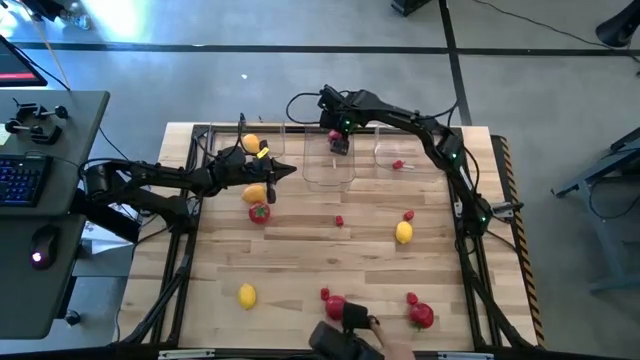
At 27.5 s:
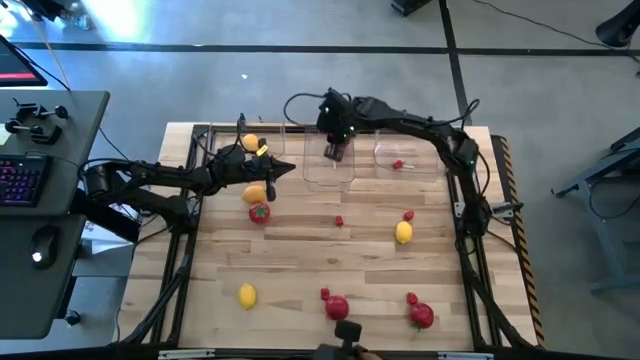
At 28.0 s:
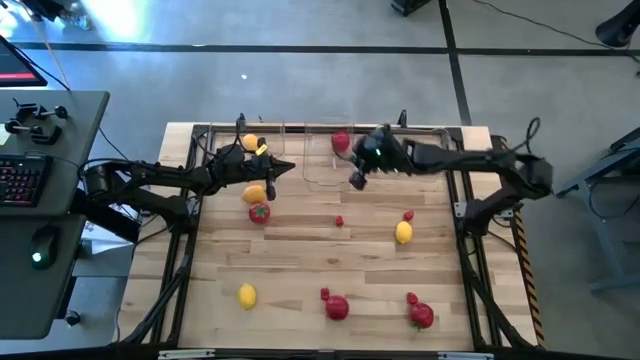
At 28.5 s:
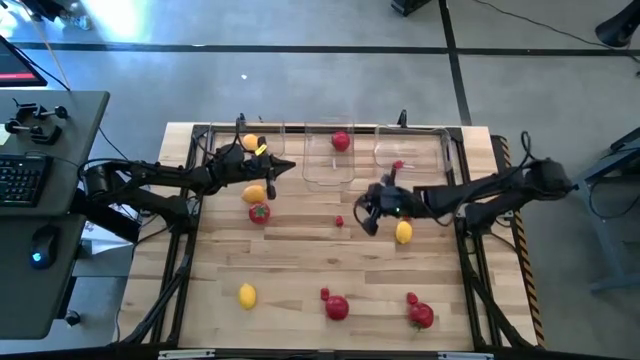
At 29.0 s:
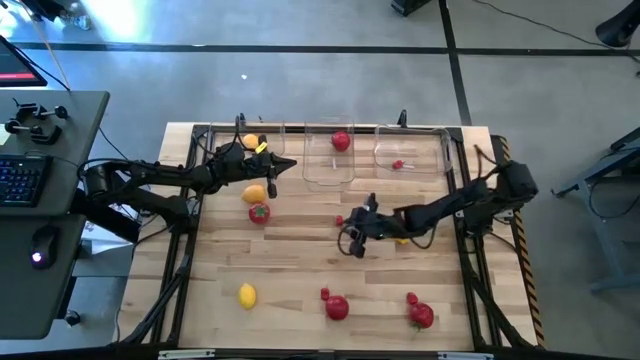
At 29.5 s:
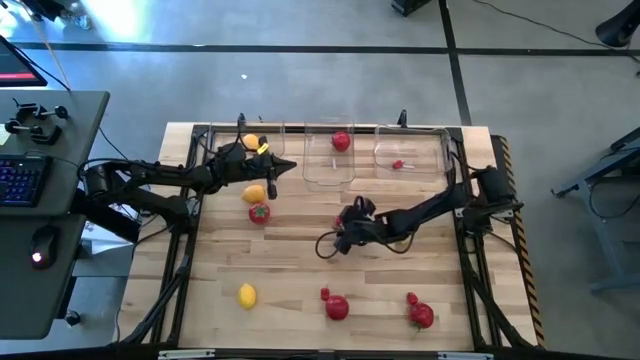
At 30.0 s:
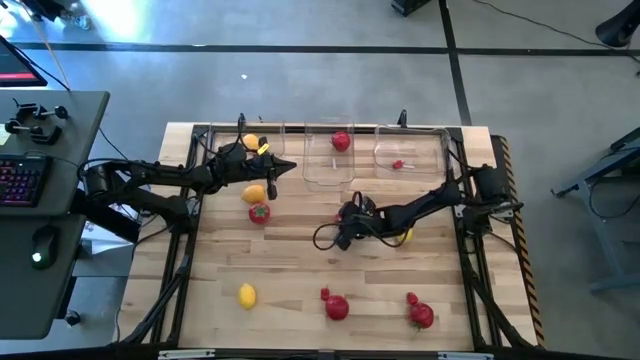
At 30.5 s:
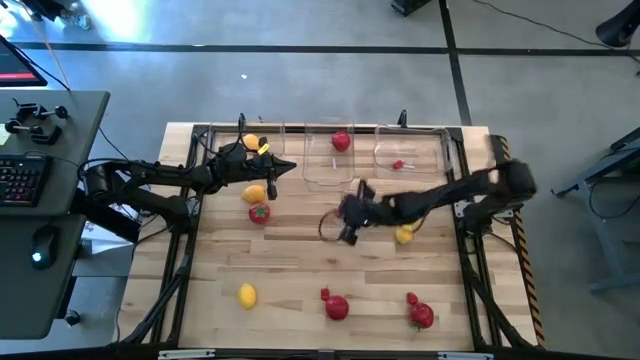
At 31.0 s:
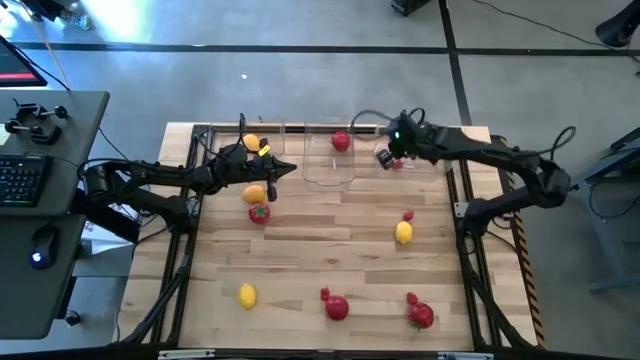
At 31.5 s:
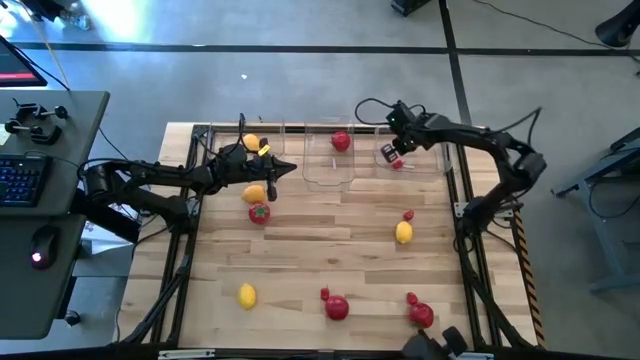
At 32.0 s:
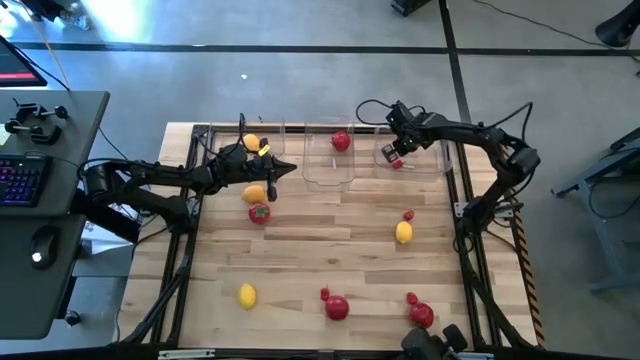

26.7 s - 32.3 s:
Task: Sort produce into baskets
Put the chili pepper into the right transparent bin

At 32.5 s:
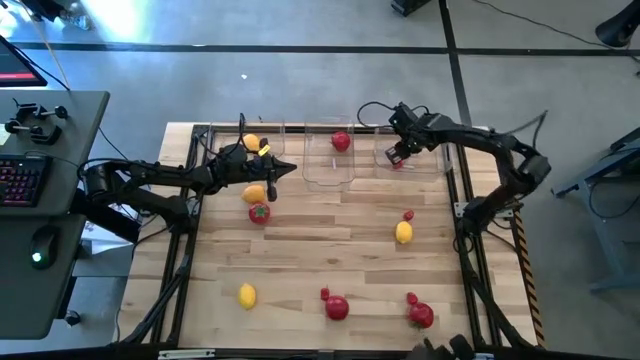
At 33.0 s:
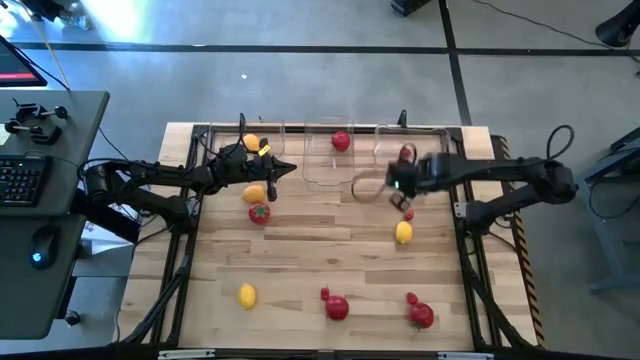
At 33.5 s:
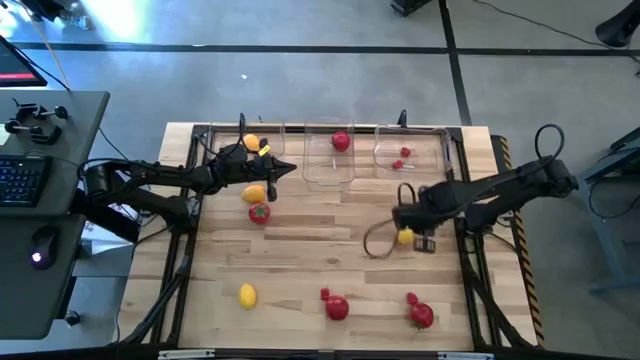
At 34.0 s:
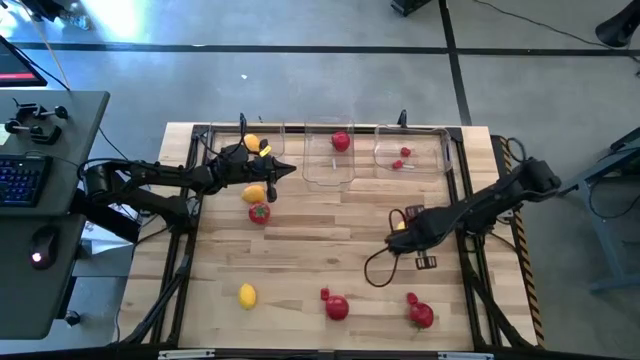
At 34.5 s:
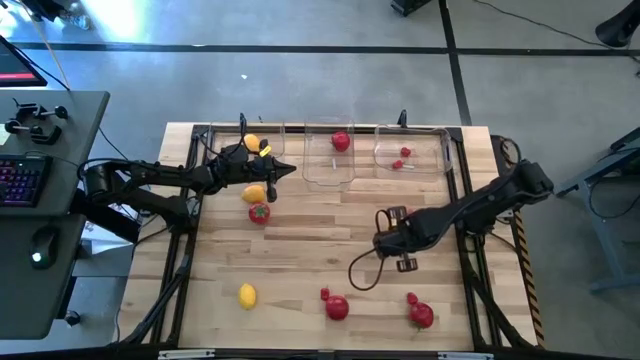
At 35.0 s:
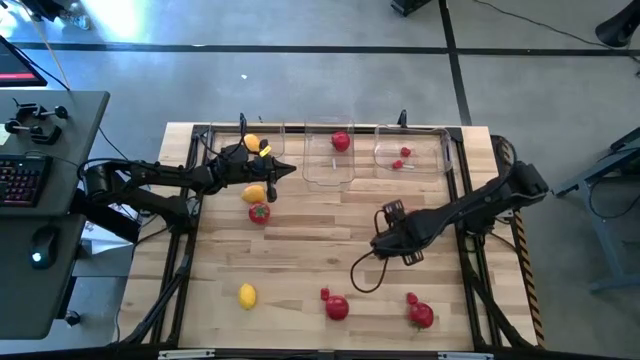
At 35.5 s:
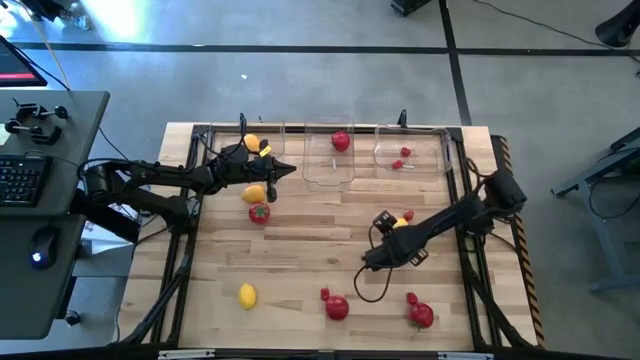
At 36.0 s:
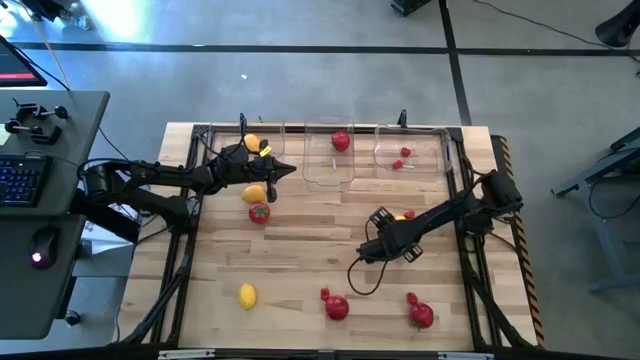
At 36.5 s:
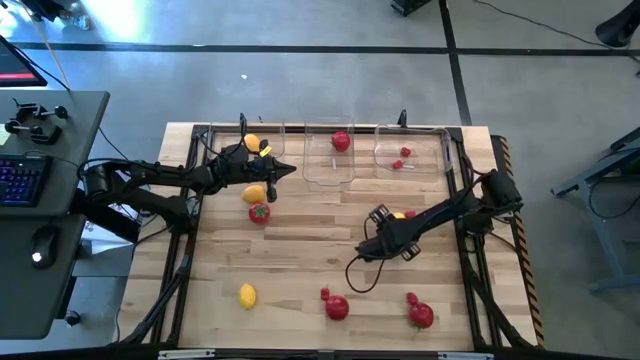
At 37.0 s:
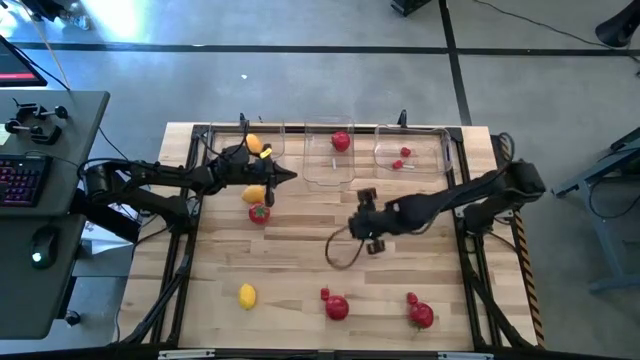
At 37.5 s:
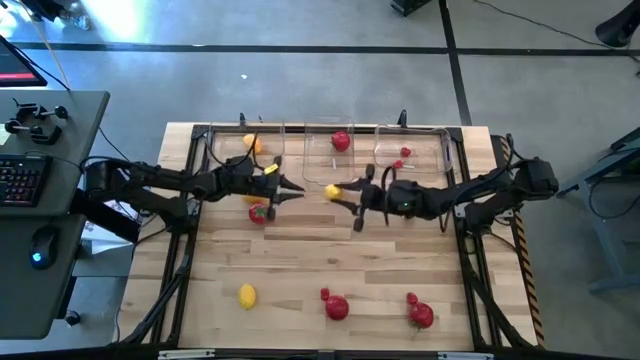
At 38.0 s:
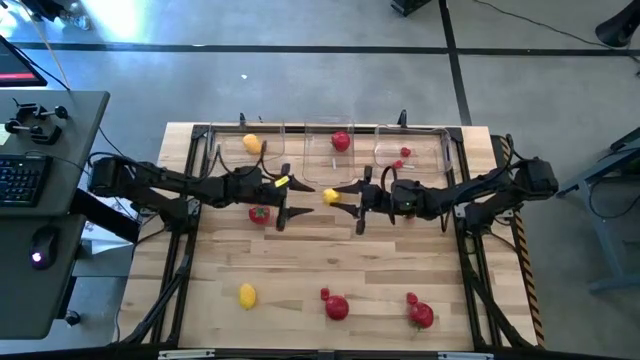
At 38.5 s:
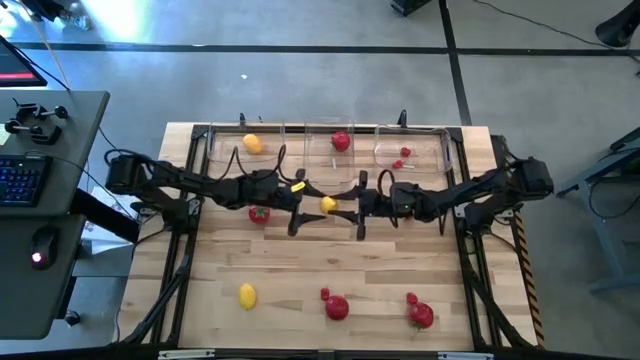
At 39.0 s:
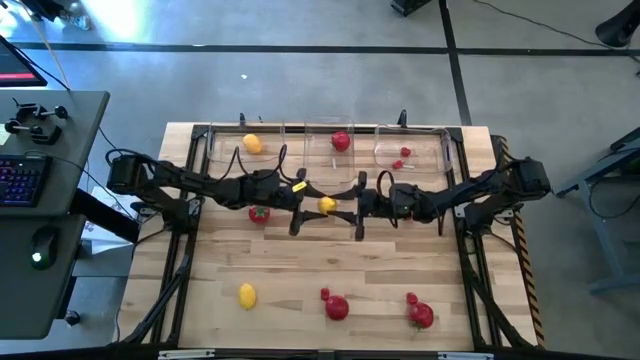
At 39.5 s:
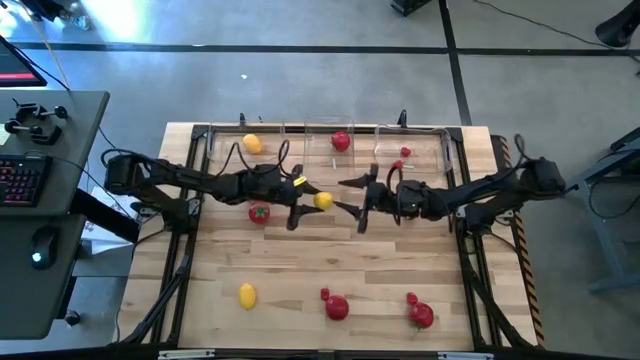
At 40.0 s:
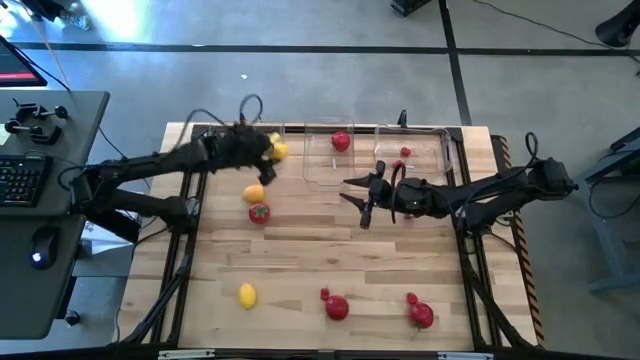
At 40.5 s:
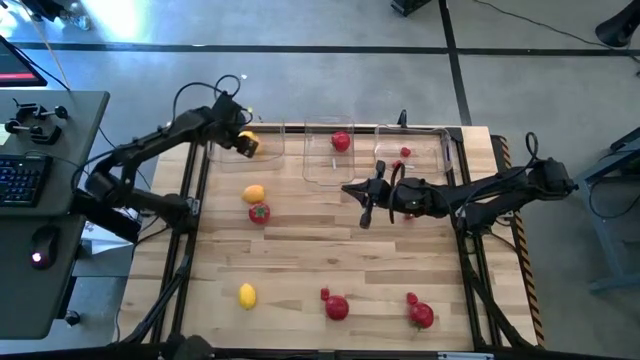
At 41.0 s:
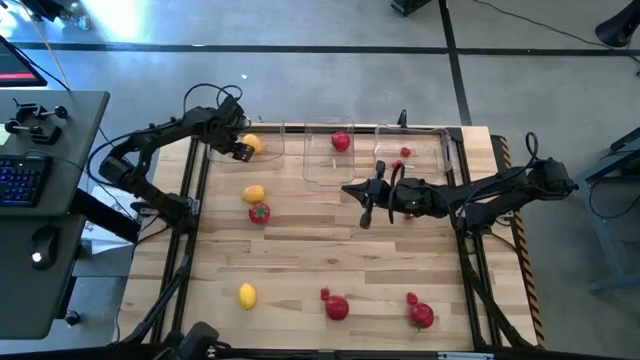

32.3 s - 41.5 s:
Put the lemon into the left transparent bin

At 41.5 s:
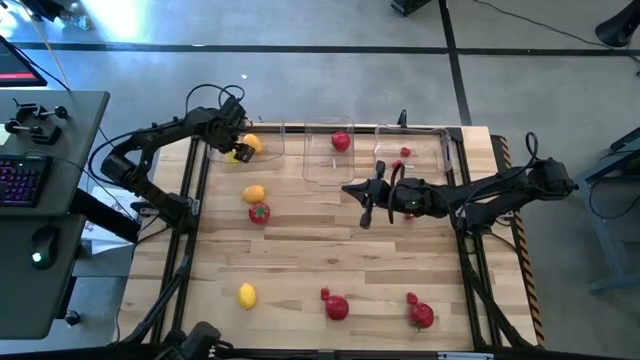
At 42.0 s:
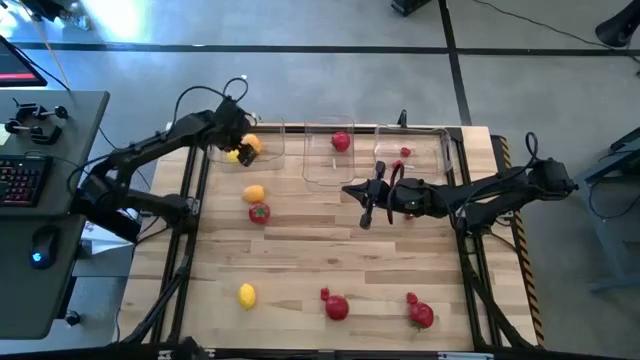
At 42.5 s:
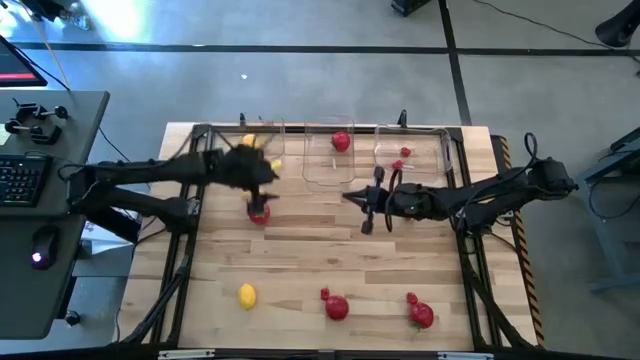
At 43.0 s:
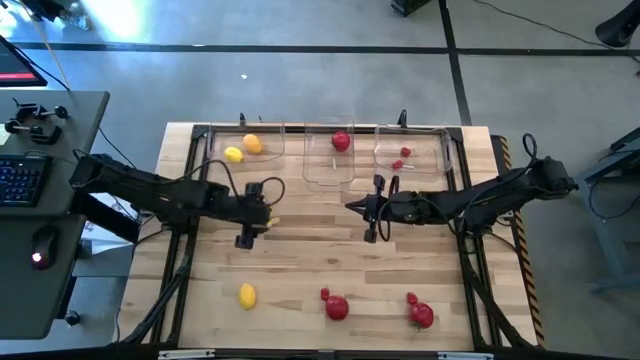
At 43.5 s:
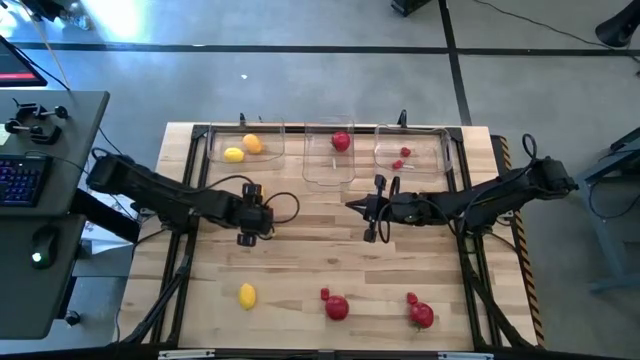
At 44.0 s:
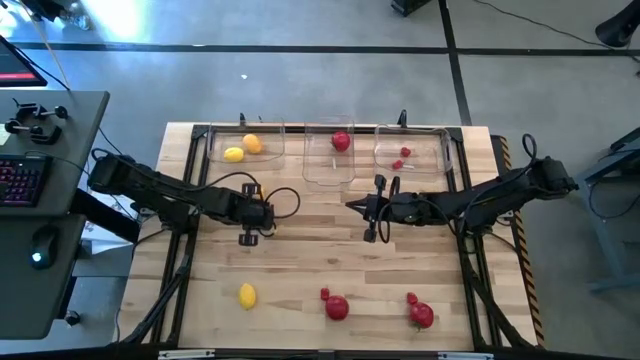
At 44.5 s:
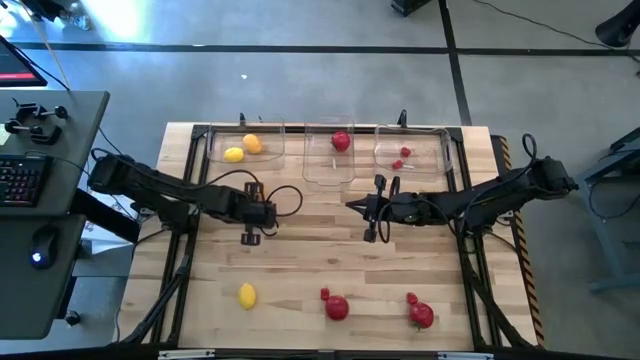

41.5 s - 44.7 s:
Put the into the middle transparent bin

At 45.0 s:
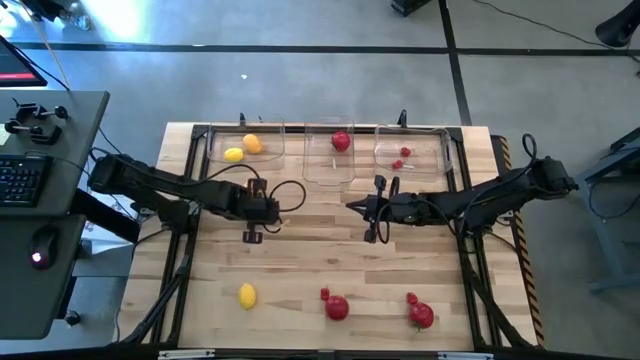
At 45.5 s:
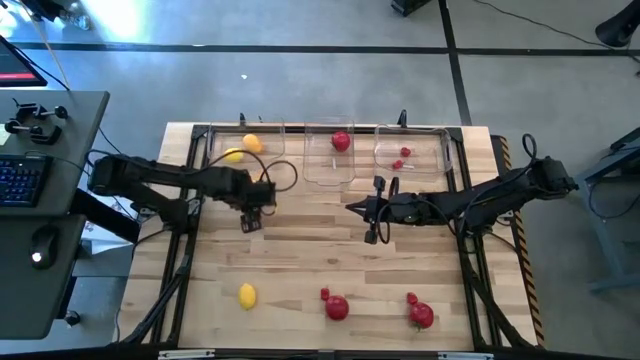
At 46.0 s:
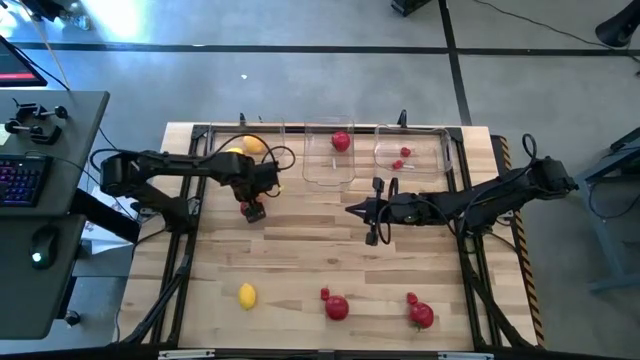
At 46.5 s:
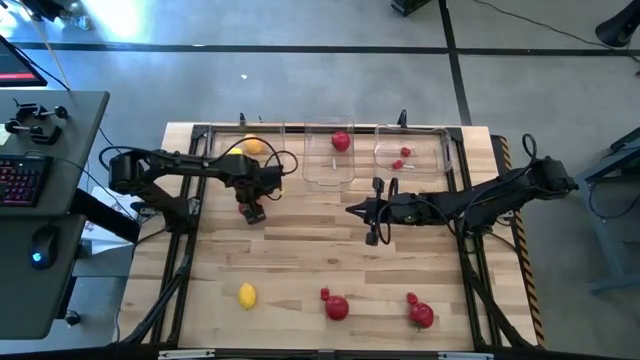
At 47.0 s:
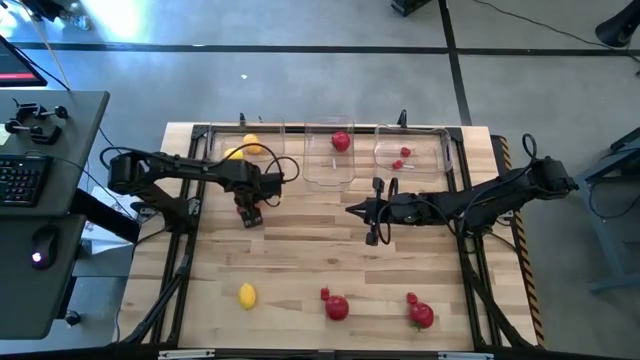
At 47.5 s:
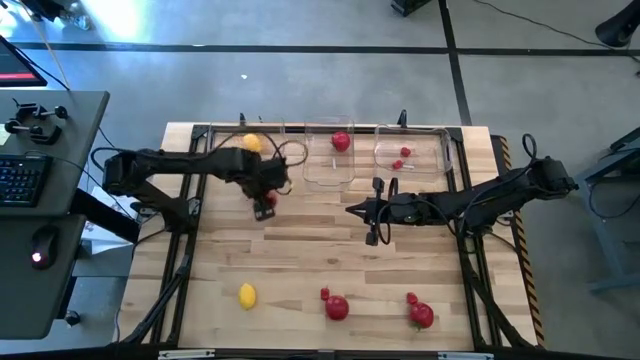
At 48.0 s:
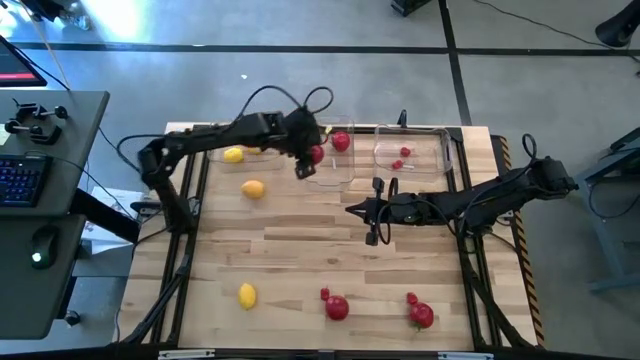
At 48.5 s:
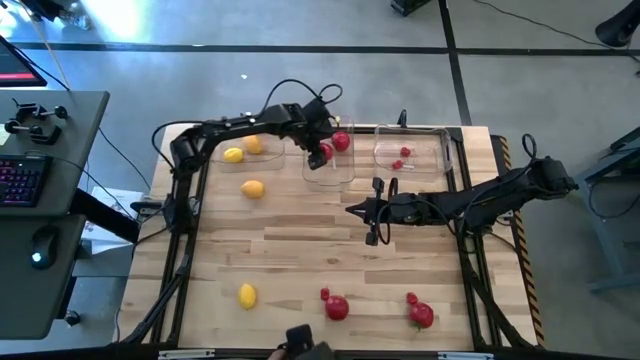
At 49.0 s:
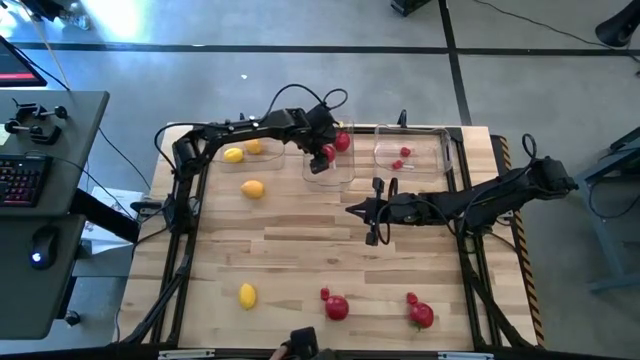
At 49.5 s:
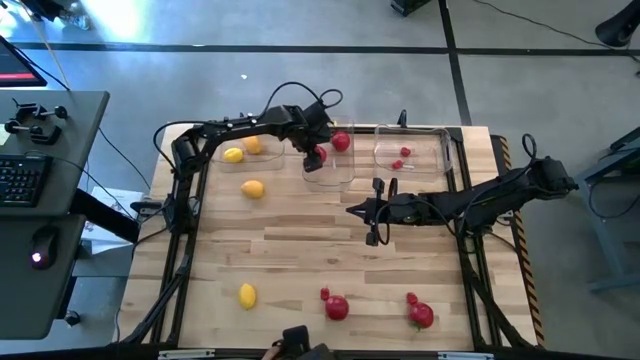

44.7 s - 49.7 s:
Put the tomato into the middle transparent bin
